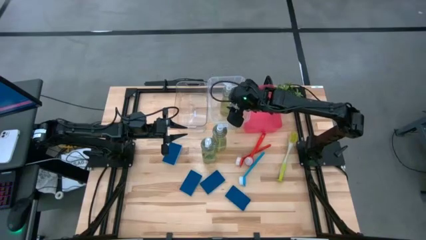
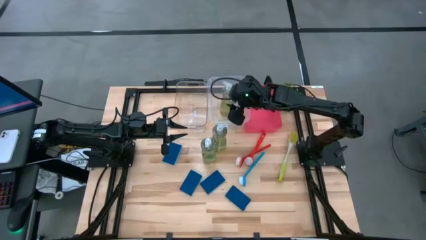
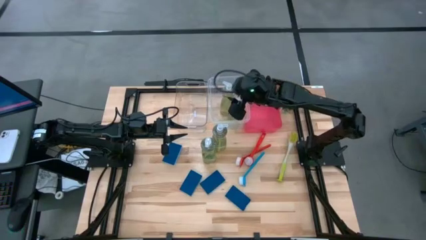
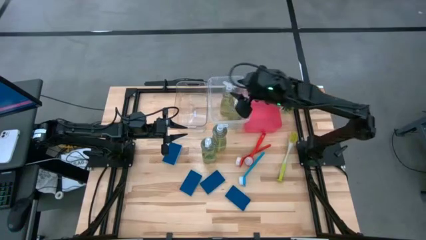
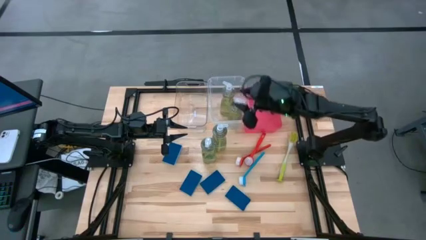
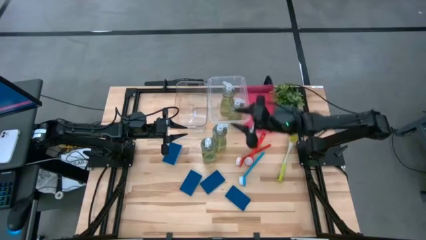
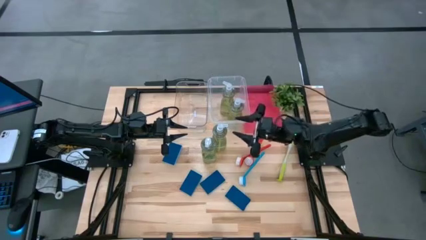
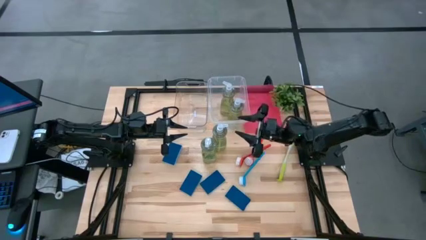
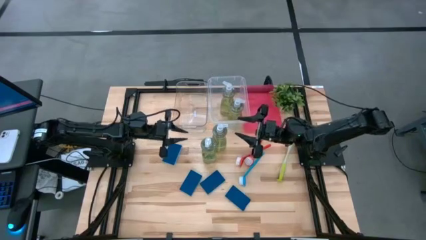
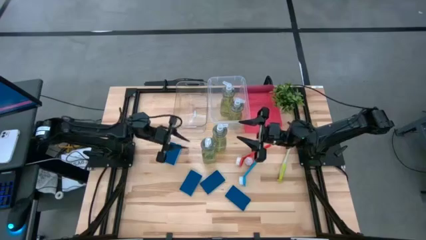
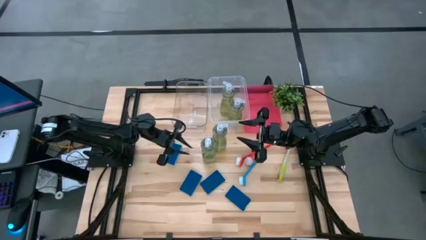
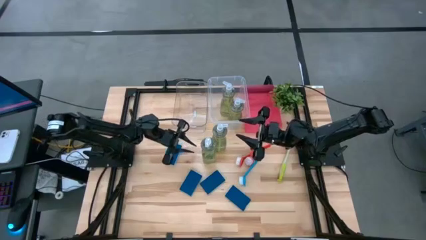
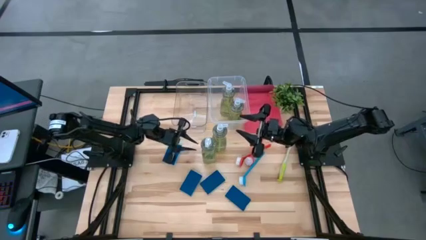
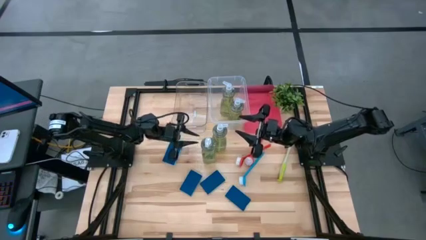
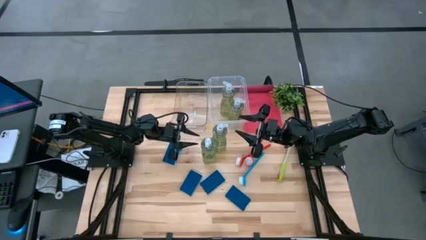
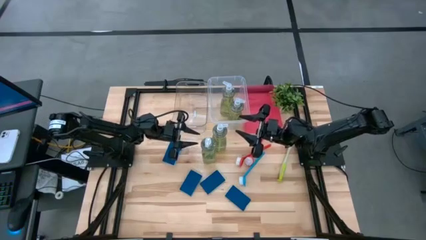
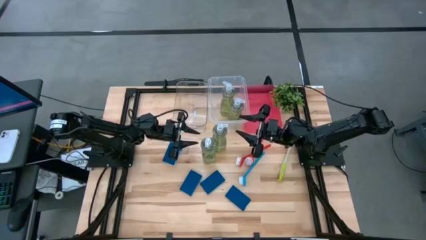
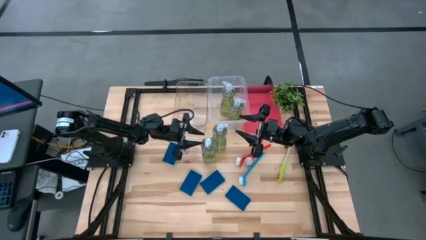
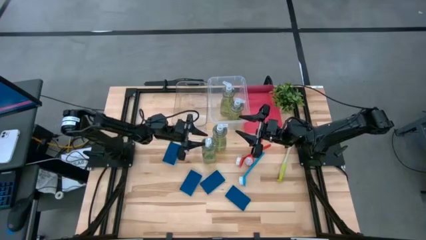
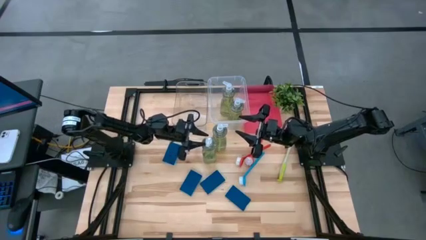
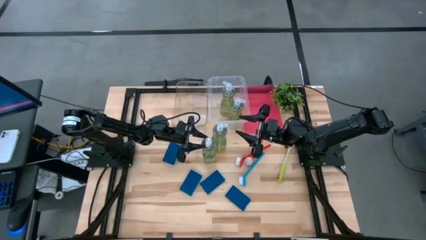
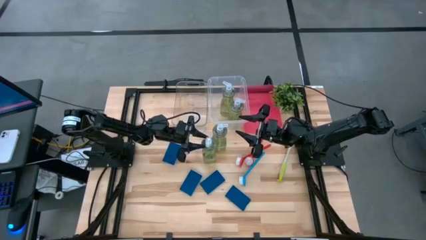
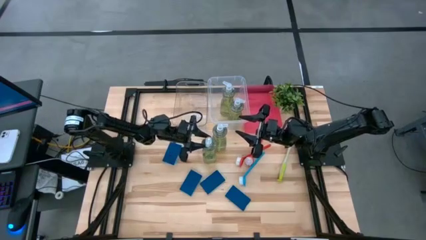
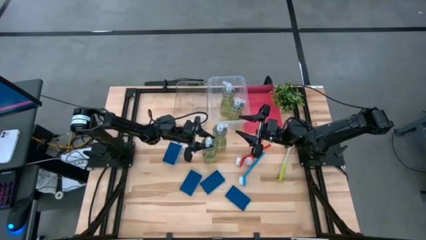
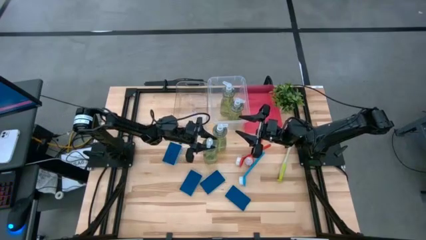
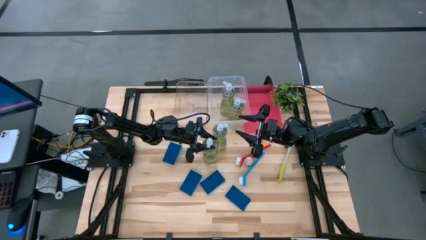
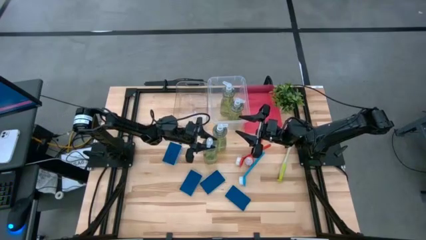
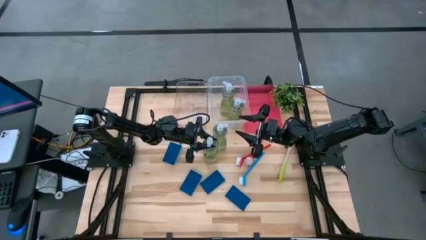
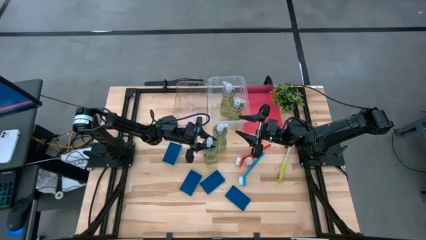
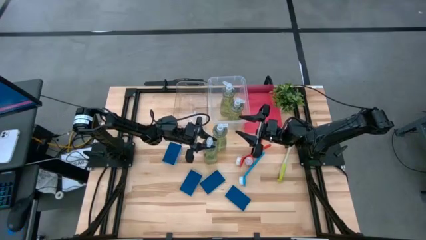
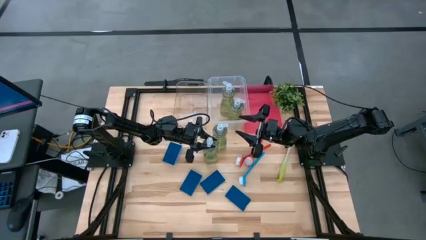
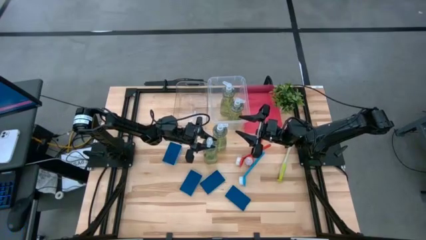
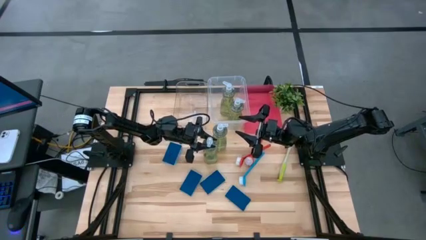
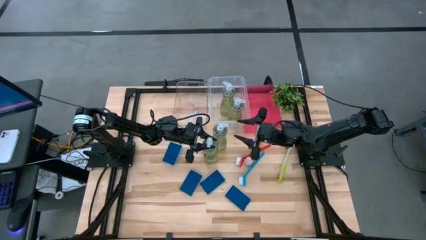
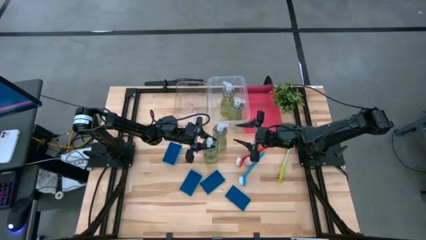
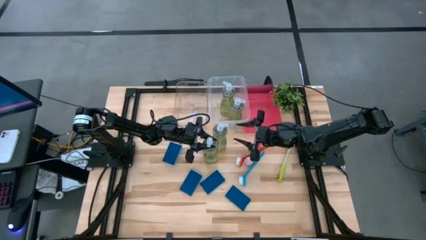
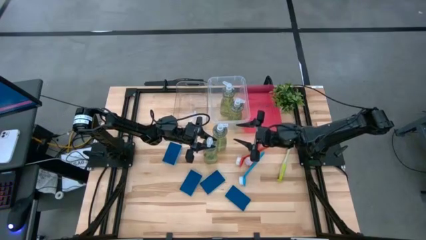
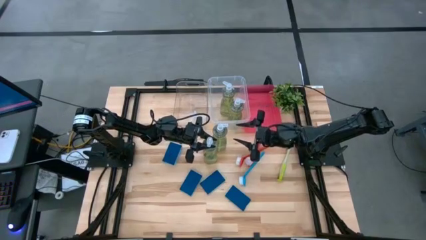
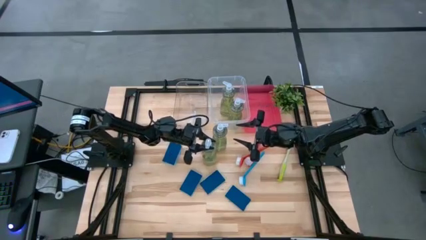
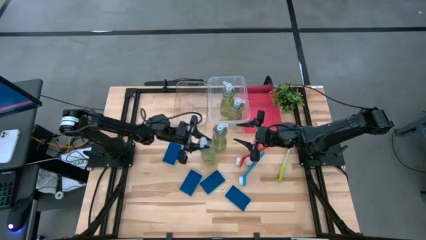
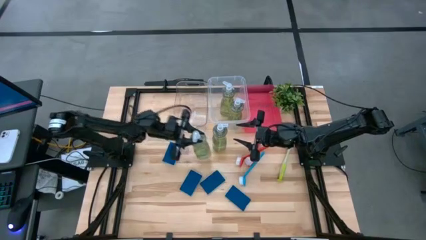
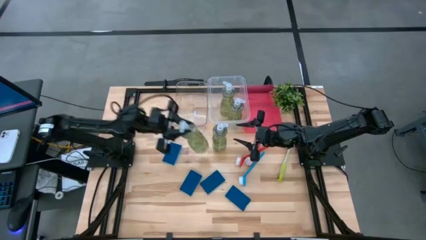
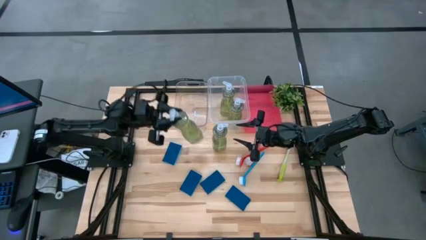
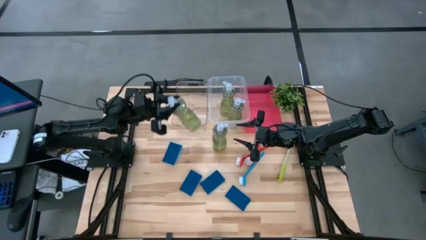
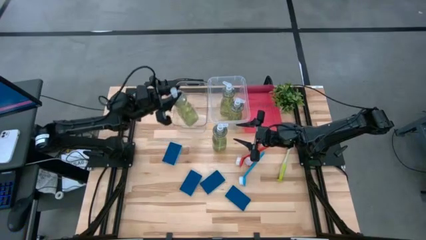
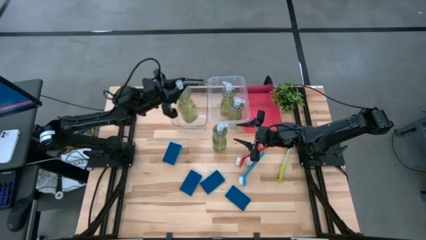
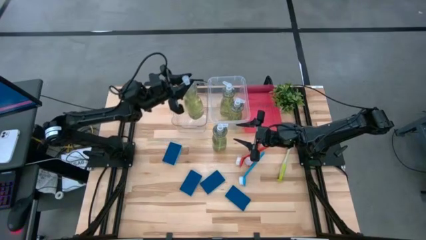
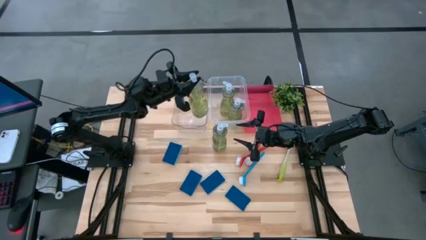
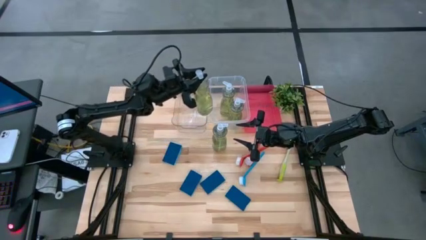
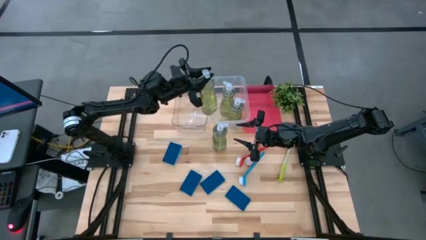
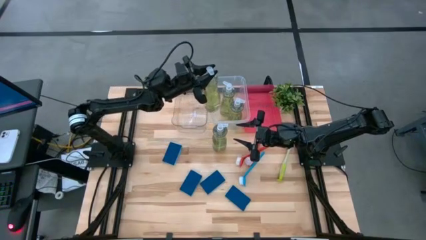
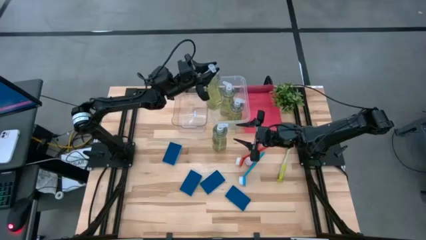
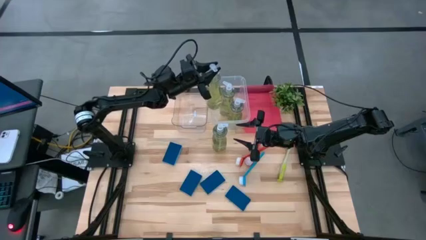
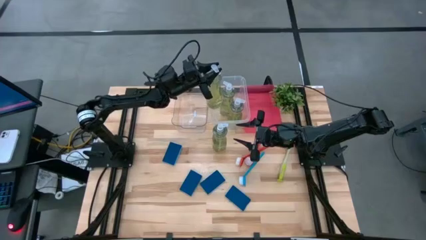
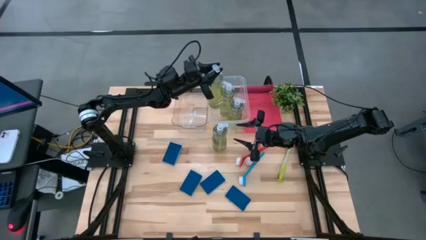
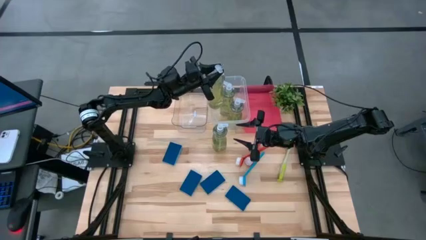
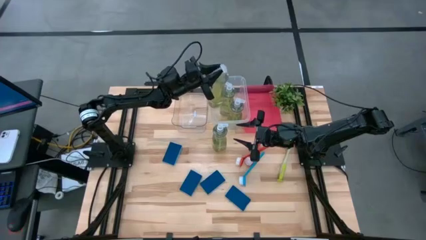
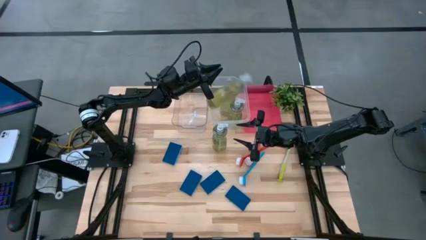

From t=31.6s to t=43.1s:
Task: Pick & Place Kitchen Sink Supplies
Put the transparent soap dispenser into the right transparent bin
